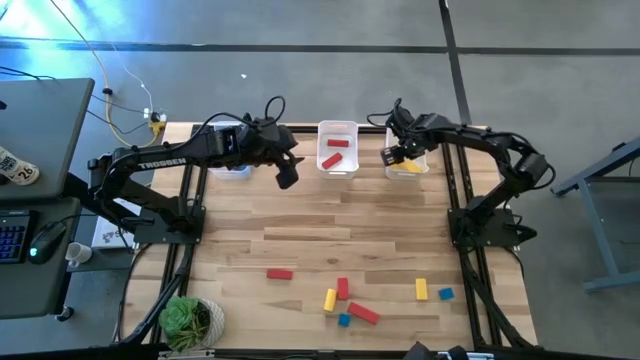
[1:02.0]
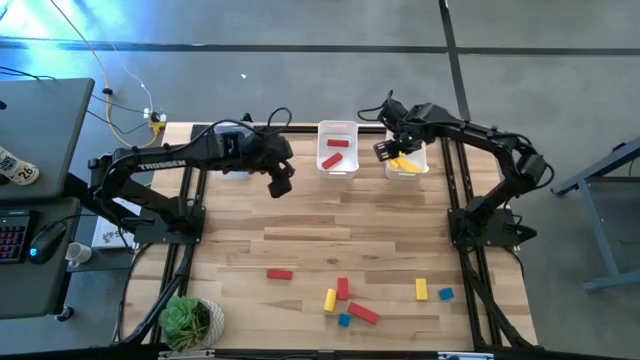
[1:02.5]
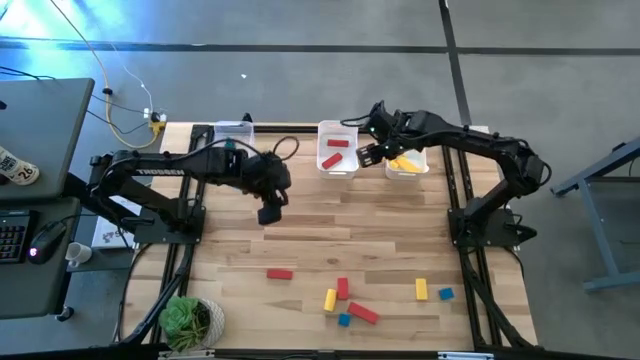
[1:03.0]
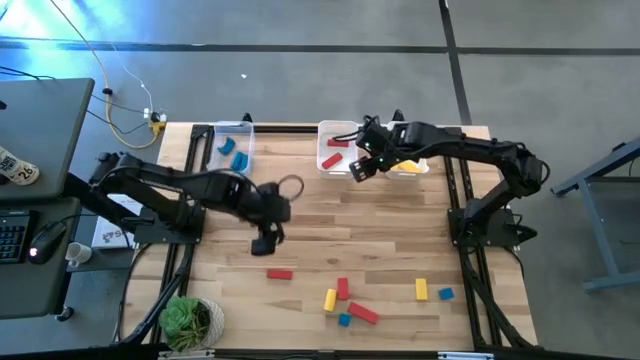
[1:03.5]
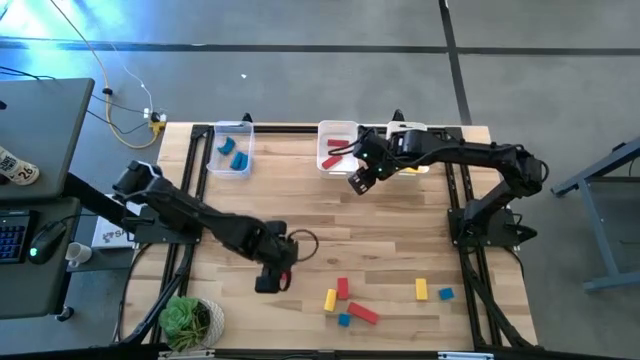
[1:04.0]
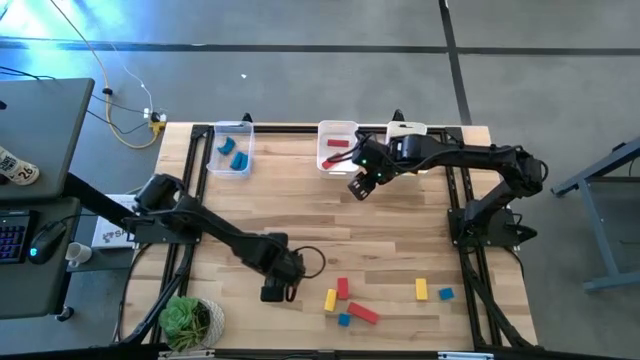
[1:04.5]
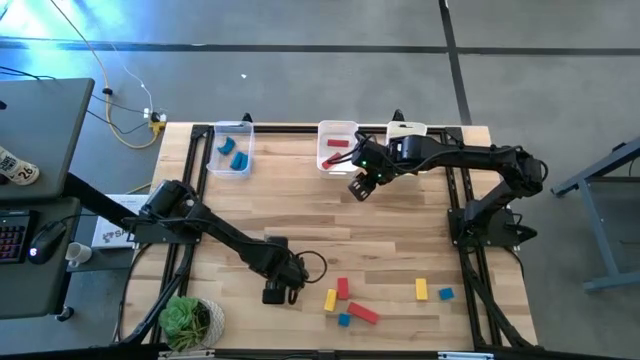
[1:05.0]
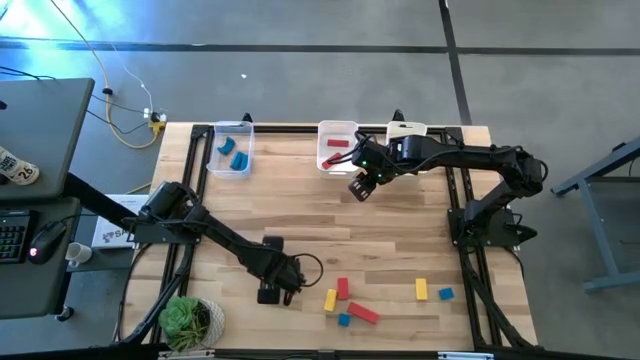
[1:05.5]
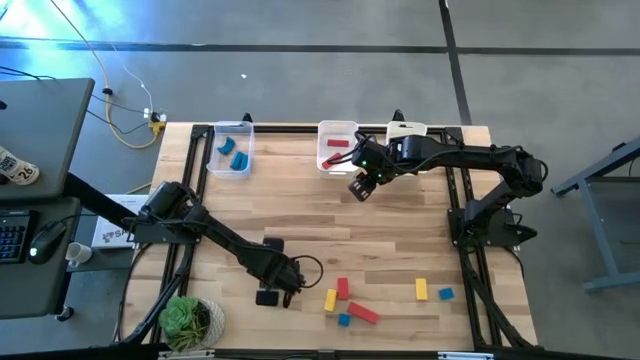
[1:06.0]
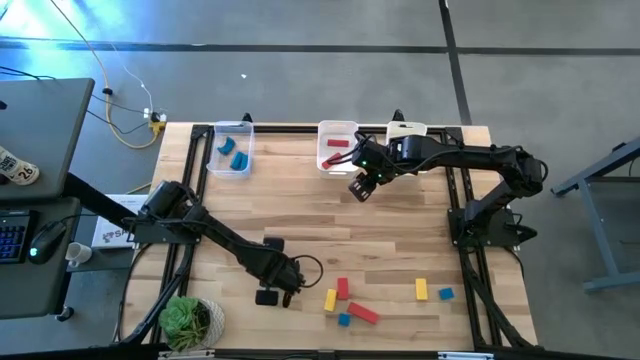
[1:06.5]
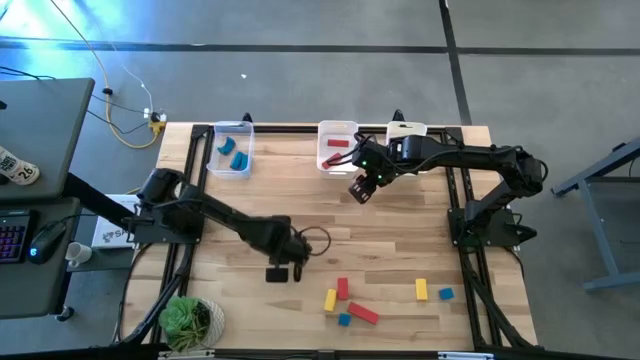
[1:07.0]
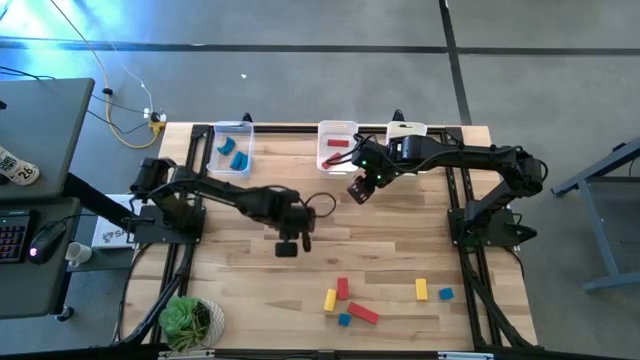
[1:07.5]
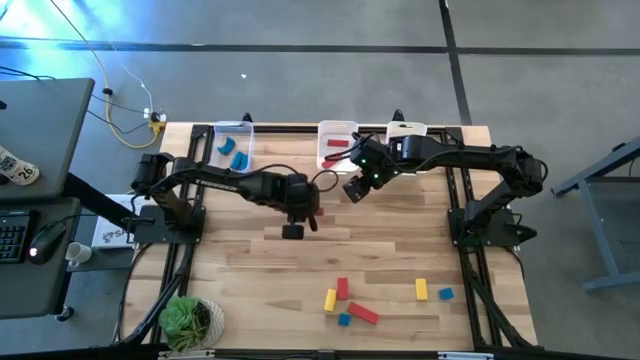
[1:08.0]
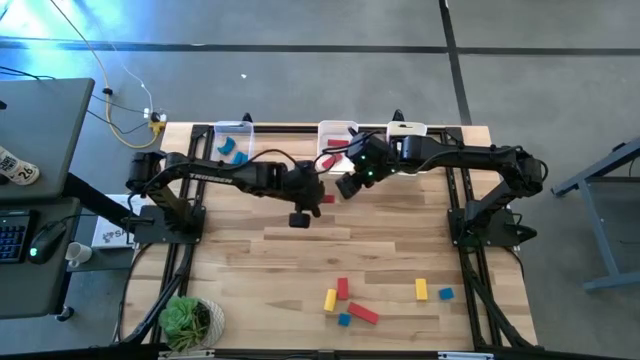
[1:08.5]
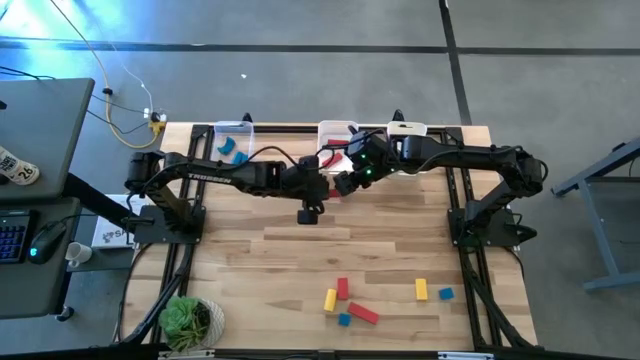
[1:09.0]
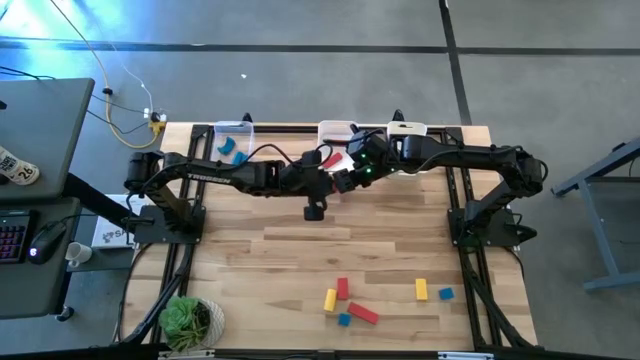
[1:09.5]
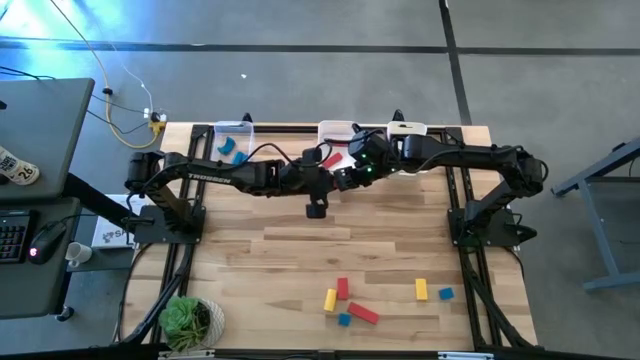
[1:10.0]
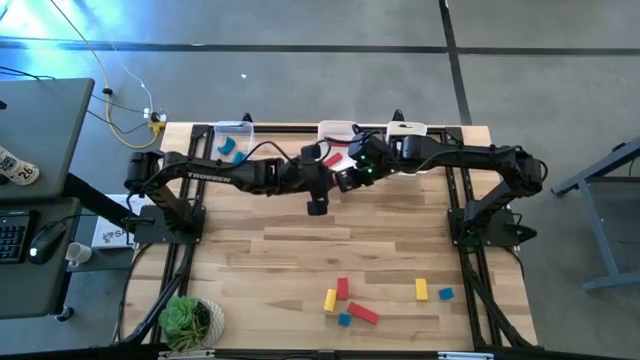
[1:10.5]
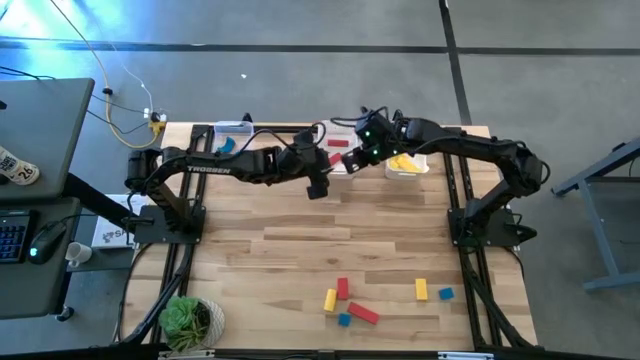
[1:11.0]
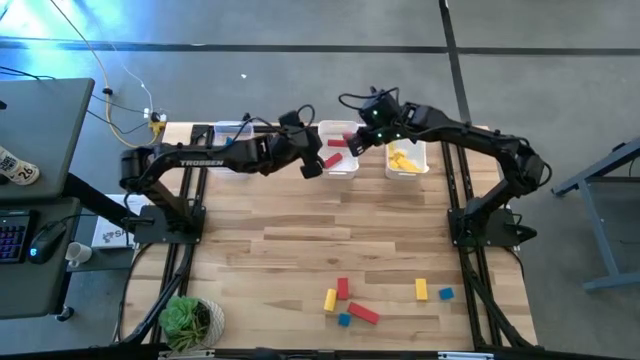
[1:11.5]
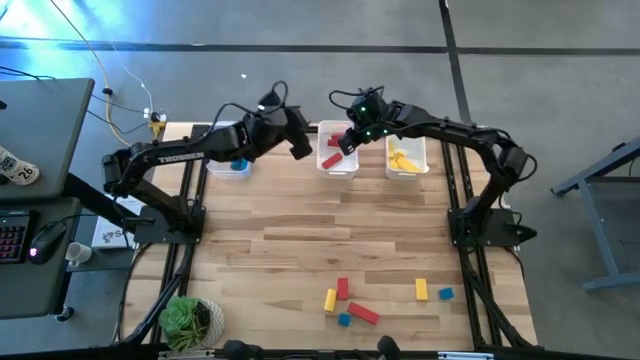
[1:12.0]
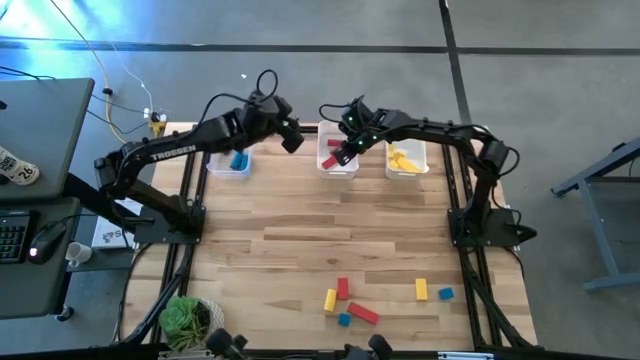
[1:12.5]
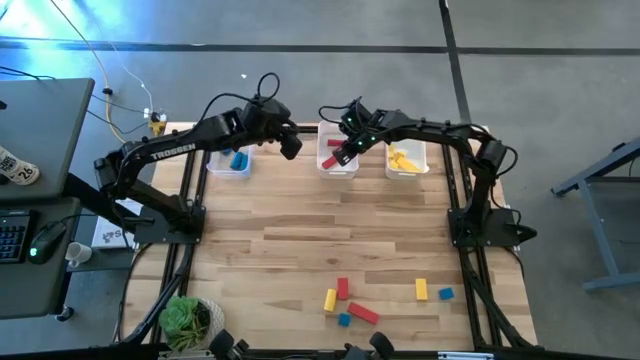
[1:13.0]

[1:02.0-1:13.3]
Task: Sort & place blocks by color
Put the red block into the left white bin

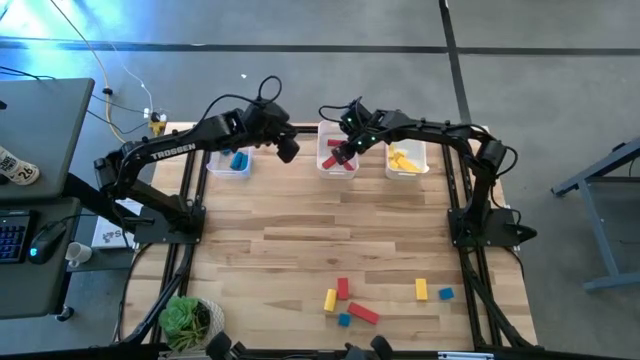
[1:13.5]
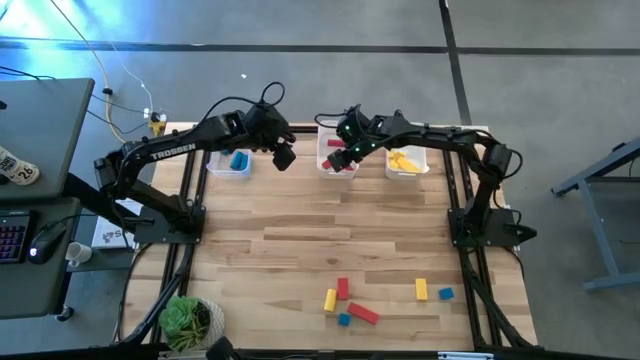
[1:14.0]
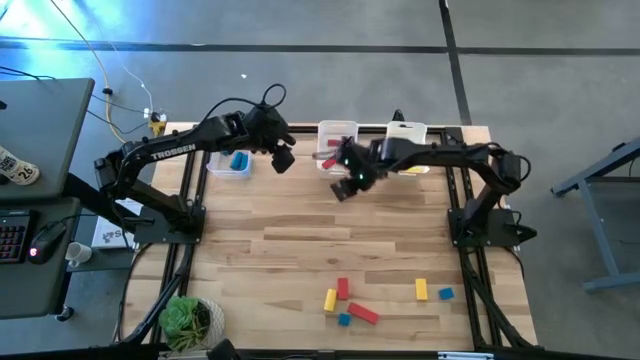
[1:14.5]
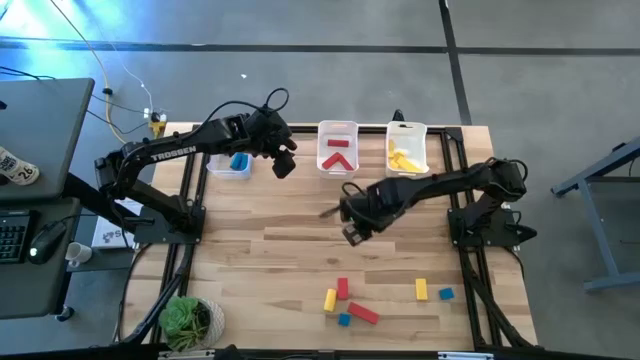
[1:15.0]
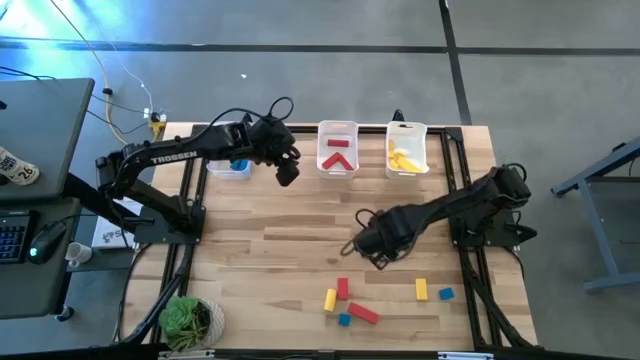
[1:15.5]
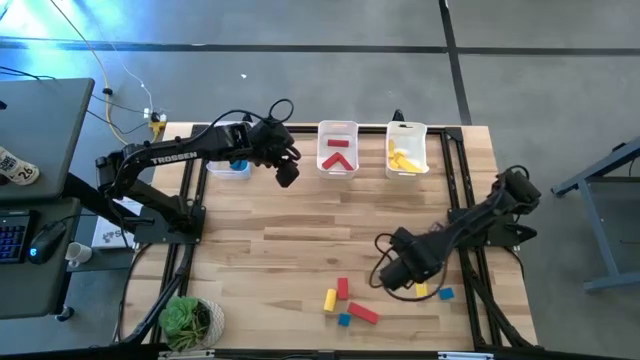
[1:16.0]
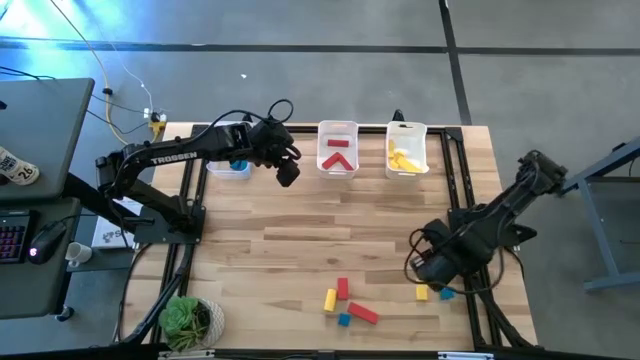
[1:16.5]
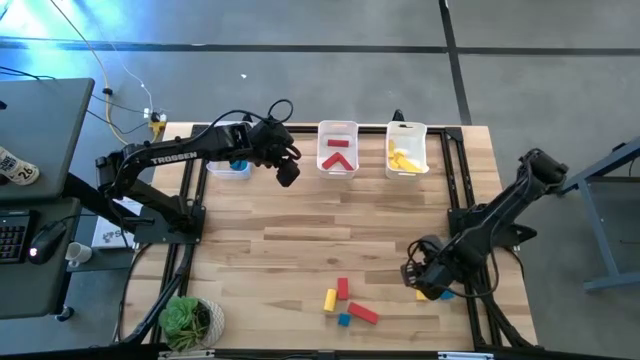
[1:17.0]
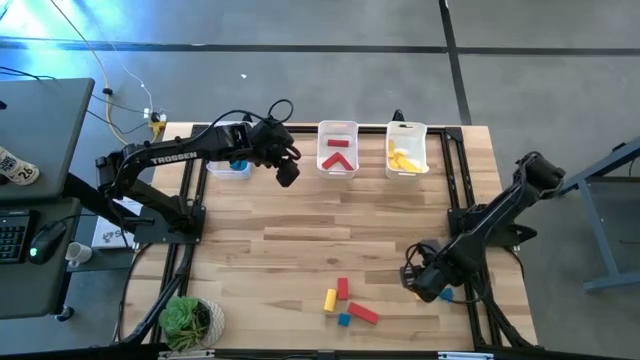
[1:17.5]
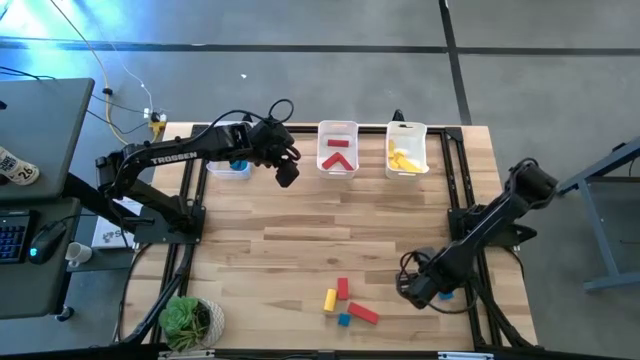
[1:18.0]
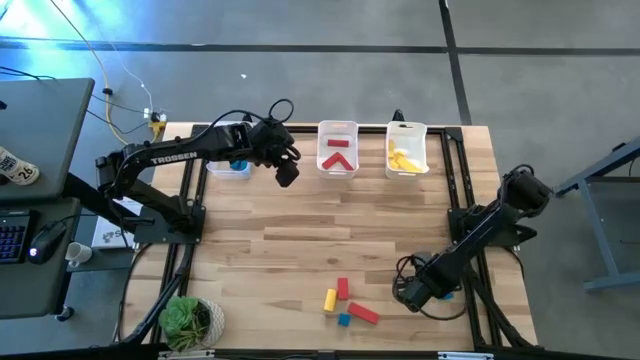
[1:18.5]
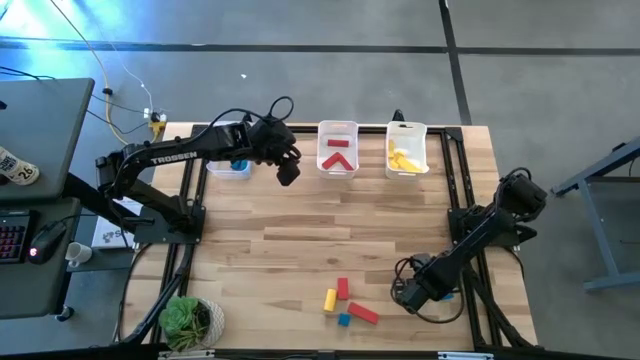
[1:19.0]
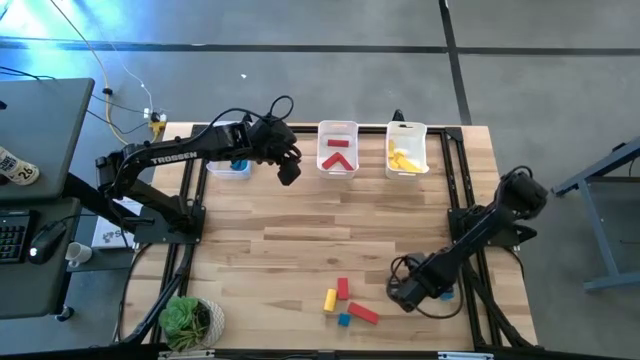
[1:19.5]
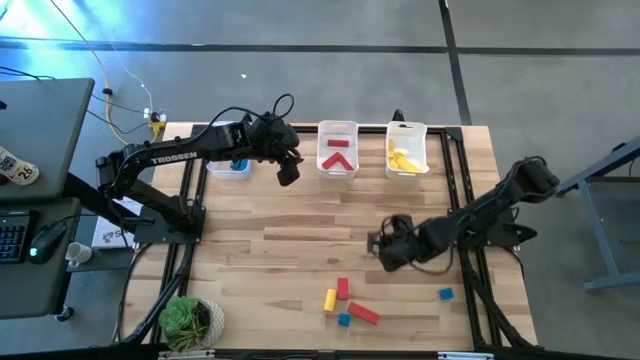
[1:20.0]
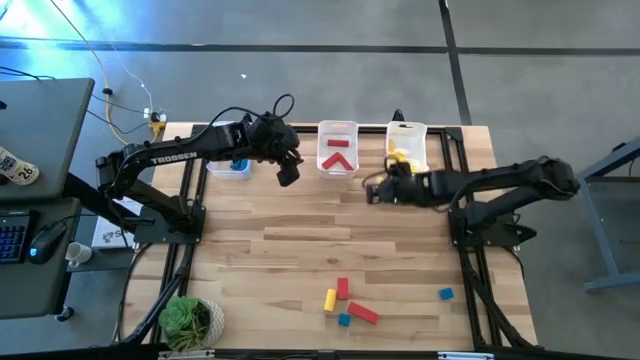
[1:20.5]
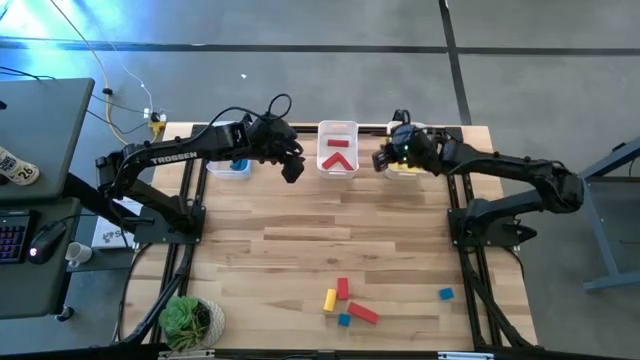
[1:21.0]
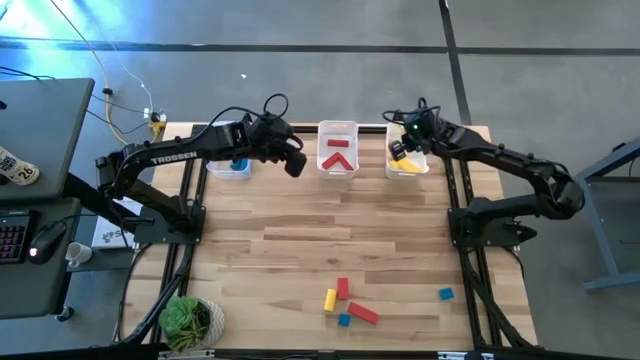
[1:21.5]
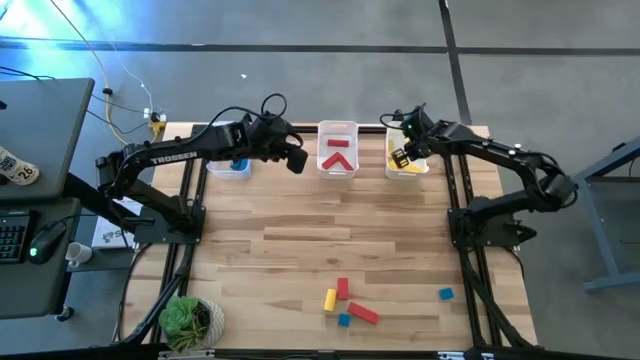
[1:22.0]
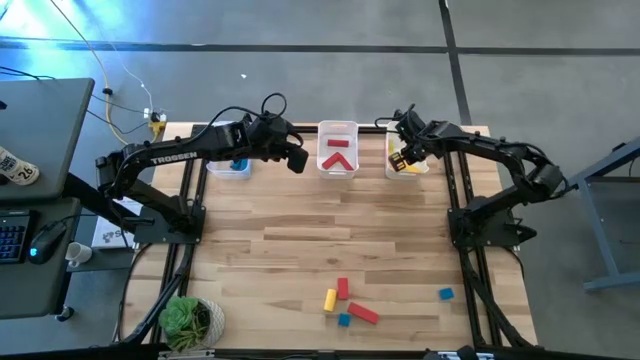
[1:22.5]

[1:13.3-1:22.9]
Put the yellow block into the right white bin

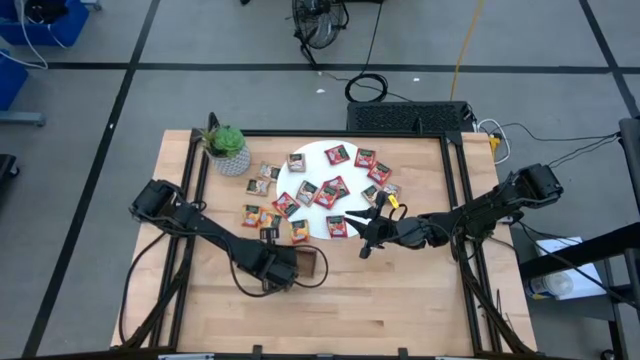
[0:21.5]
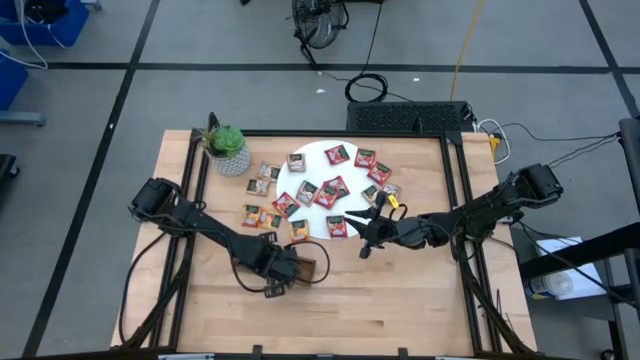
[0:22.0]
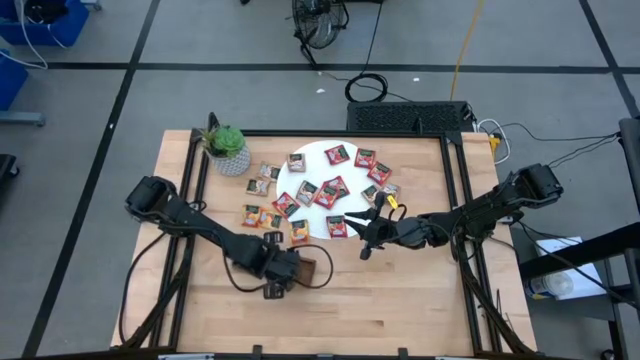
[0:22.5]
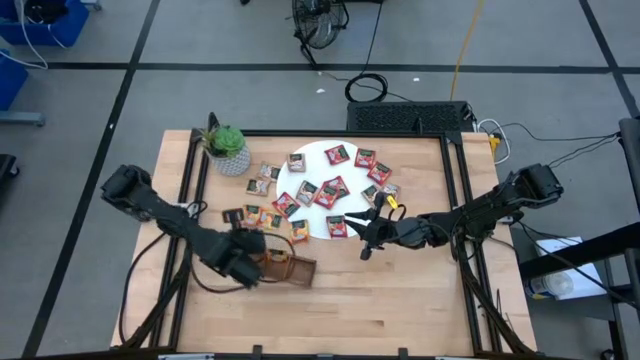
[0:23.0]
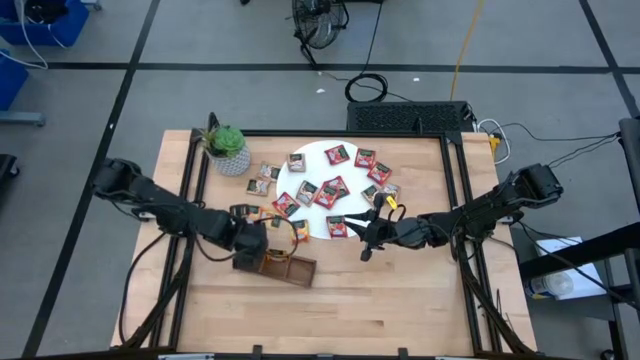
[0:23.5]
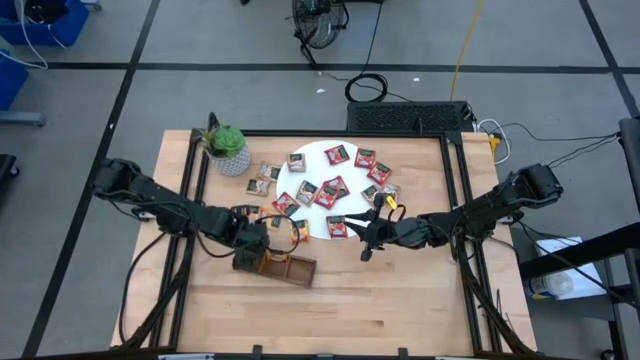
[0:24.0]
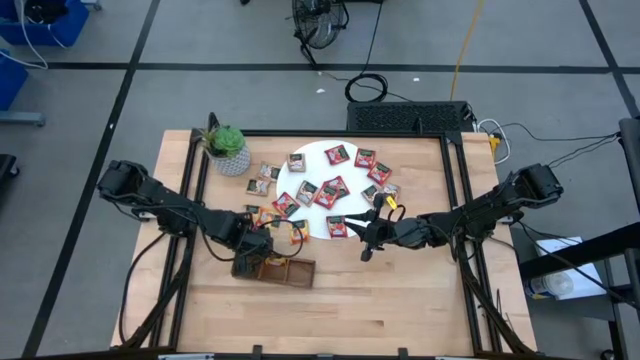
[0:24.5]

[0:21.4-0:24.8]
Task: Pick & Place Tea
Adjust the wooden organizer
